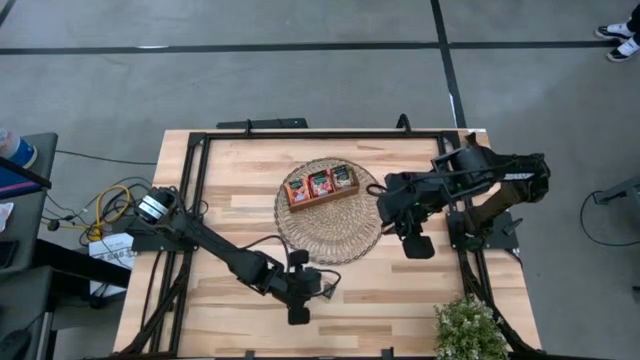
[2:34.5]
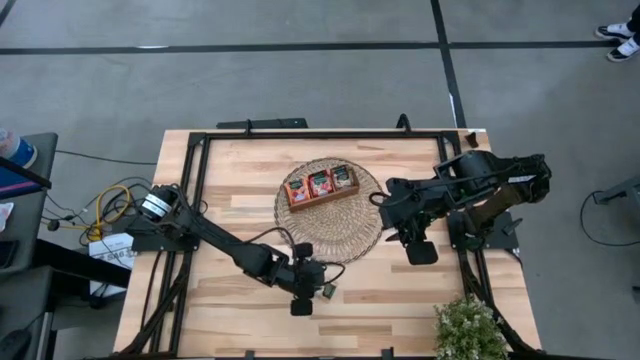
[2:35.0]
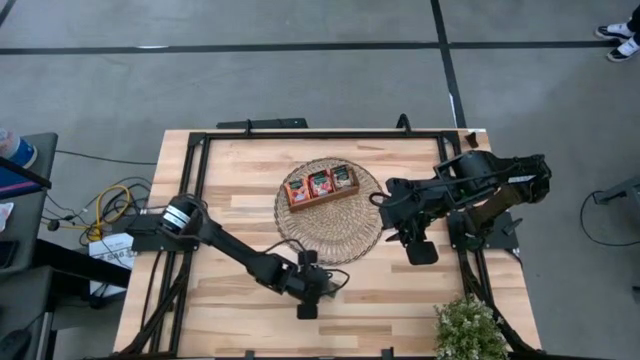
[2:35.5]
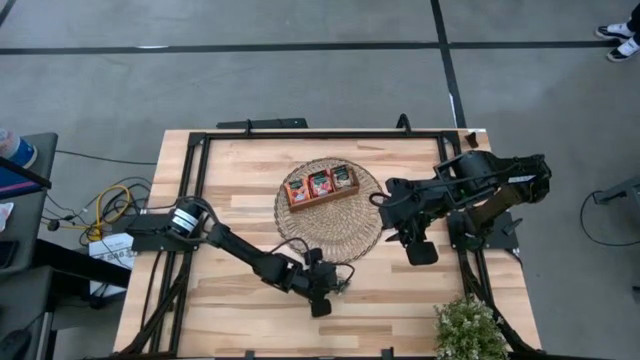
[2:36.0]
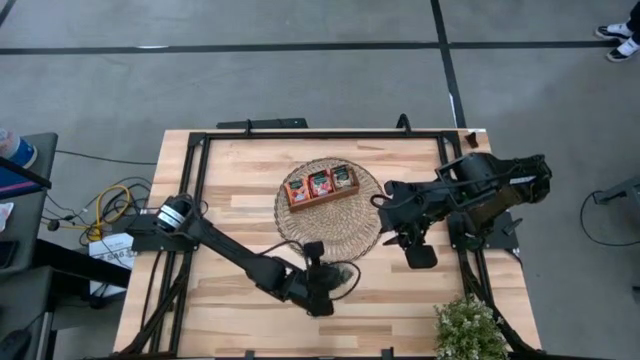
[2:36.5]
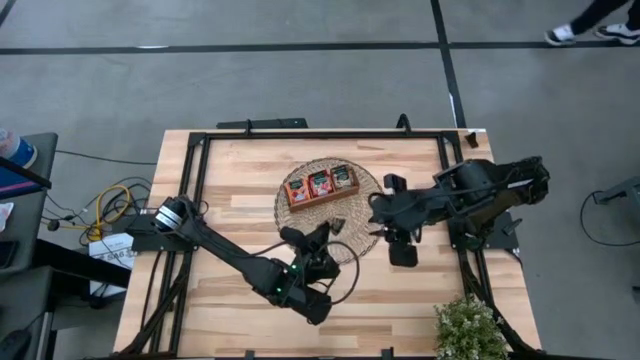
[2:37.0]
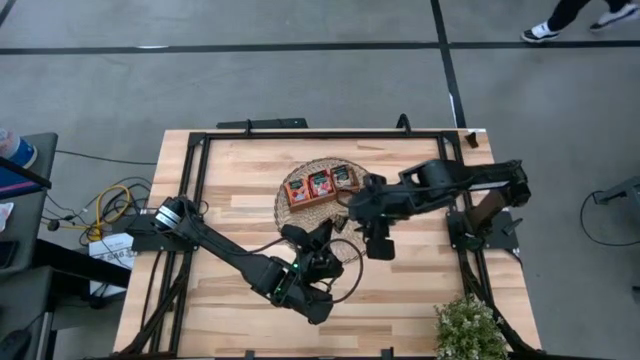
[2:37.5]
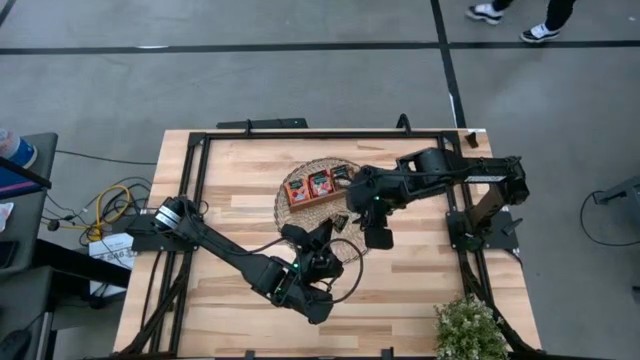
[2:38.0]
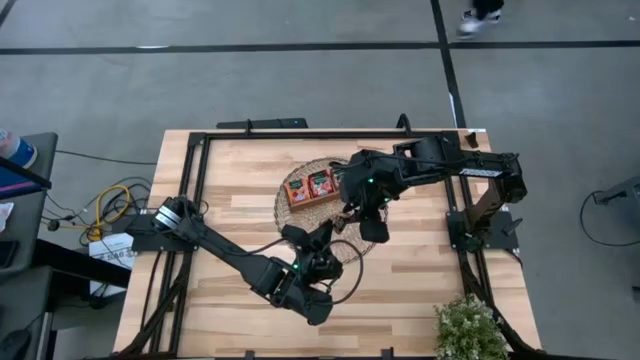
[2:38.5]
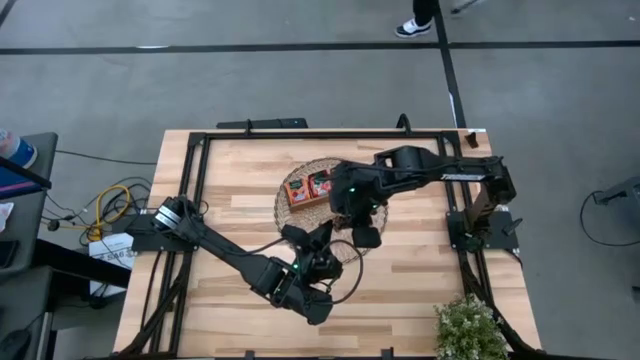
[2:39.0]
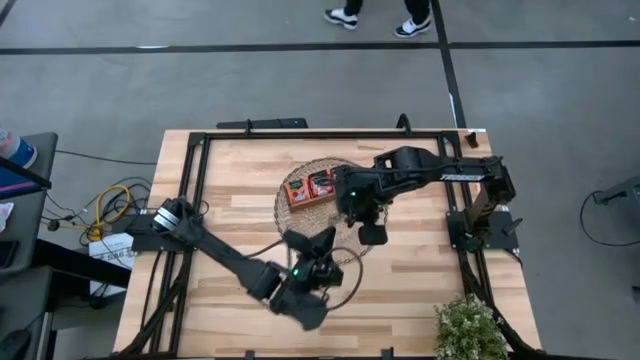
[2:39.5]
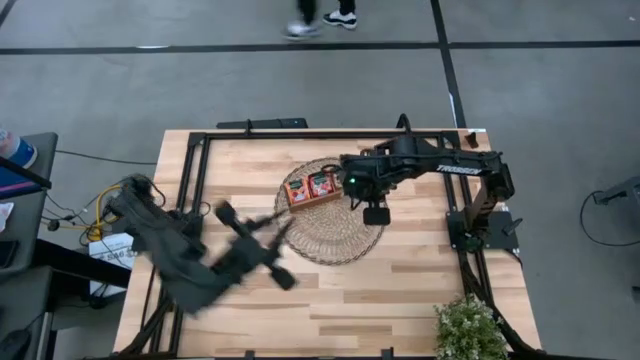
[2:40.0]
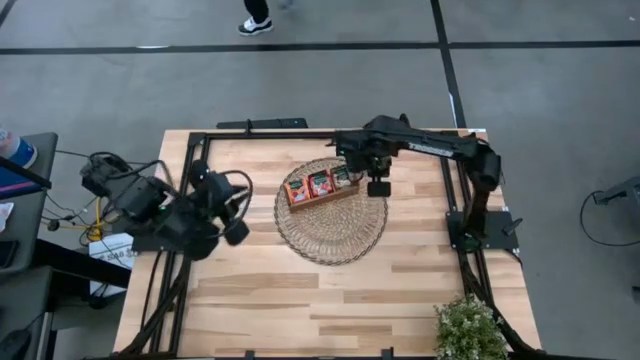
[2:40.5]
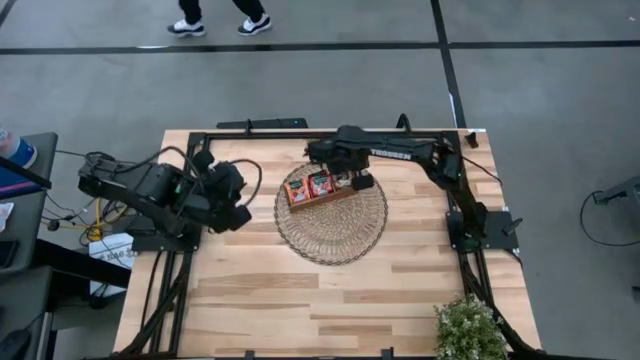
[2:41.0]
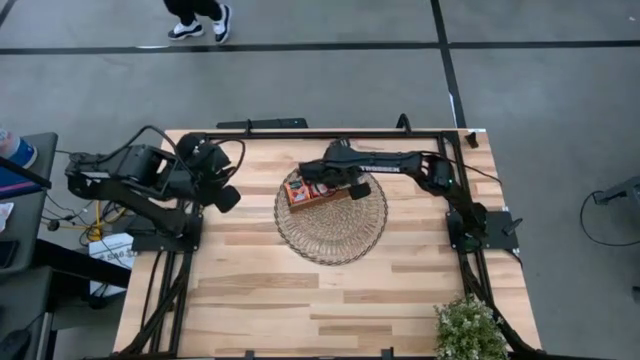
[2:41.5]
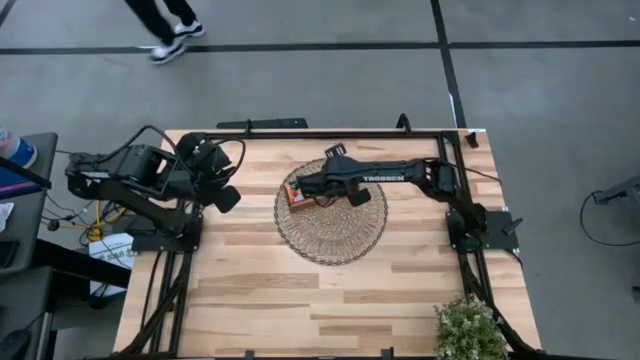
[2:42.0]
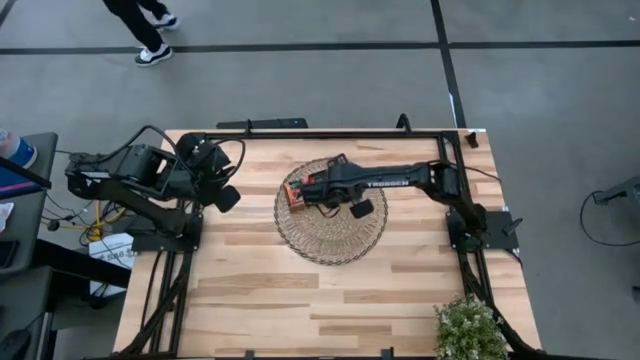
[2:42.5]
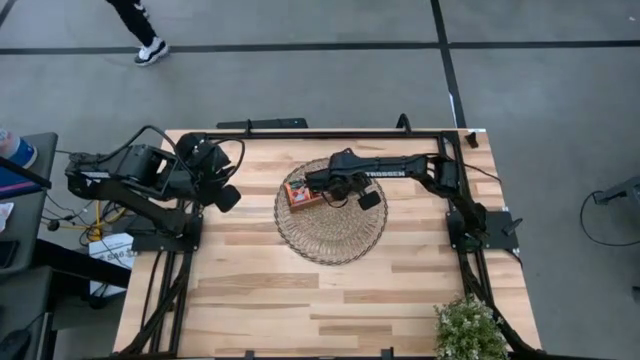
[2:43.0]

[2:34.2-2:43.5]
Task: Pick & Place Tea
Put the brown tea bag into the right section of the wooden organizer

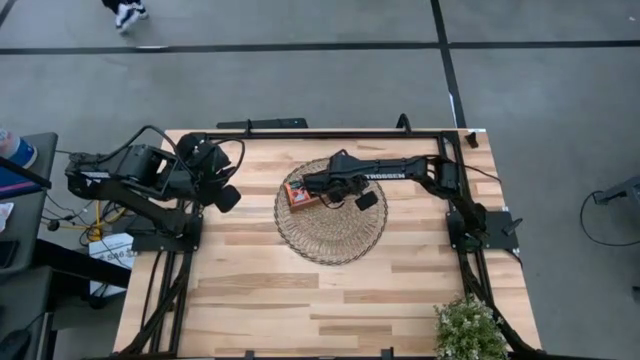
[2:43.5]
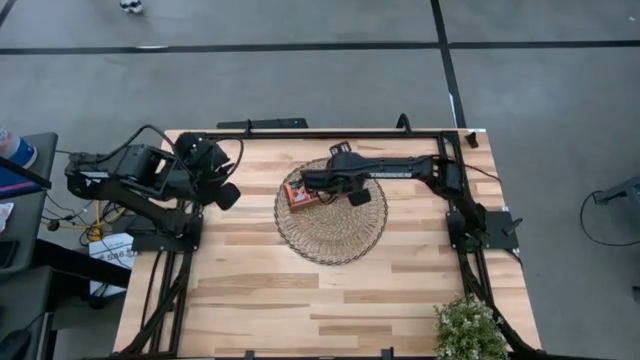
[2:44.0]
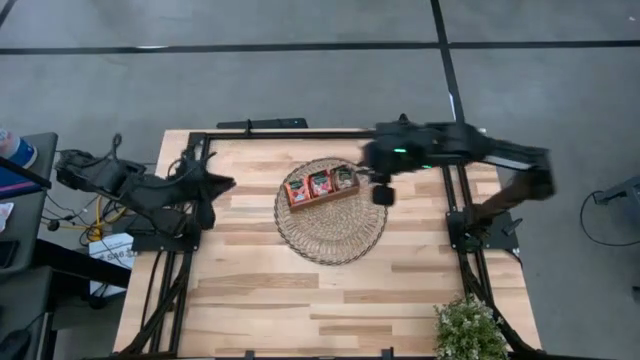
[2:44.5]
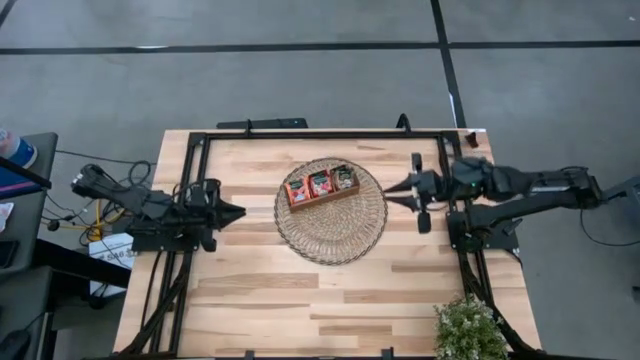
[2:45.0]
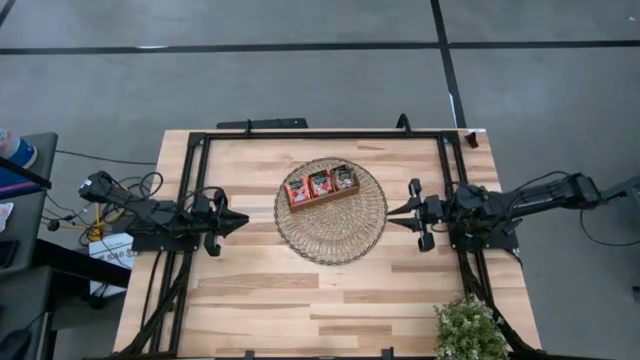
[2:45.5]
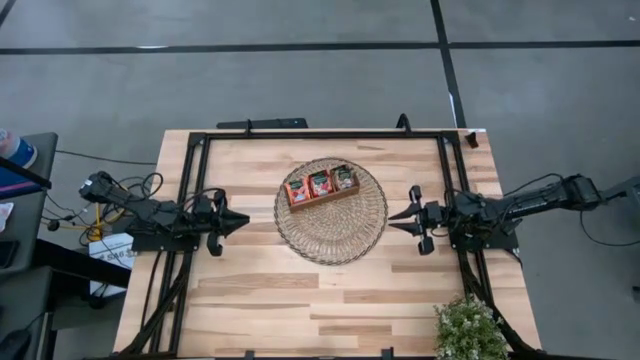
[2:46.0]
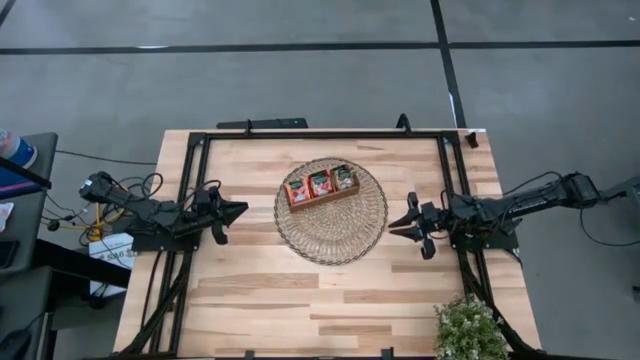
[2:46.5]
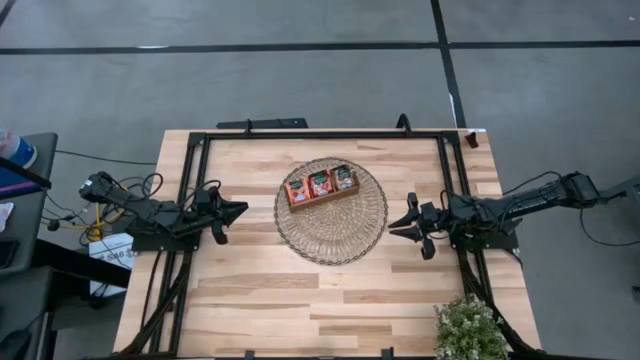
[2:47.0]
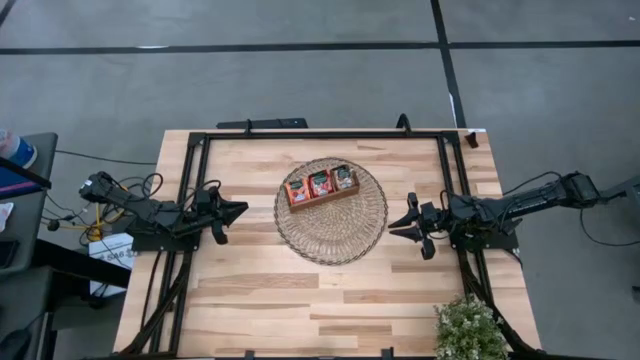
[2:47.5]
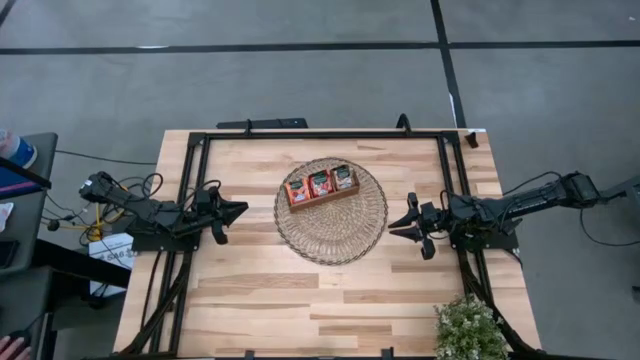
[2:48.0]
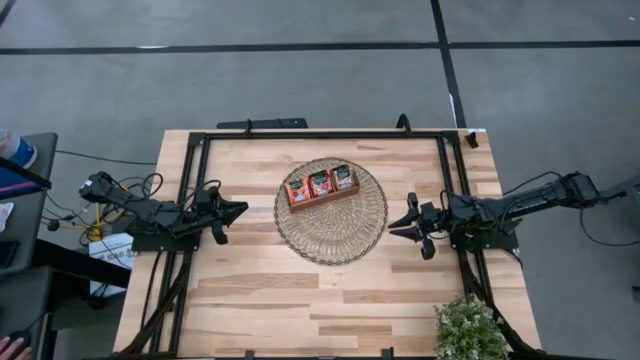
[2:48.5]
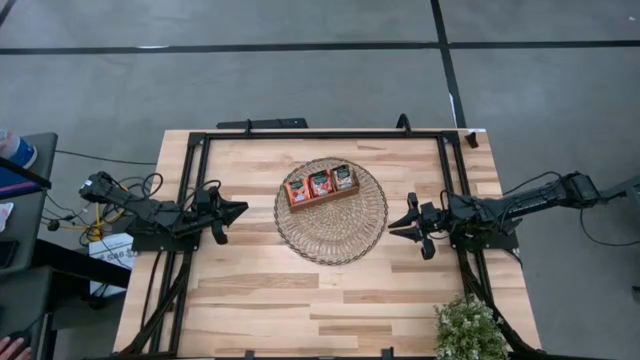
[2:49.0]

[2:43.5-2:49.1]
Return to Home Position
